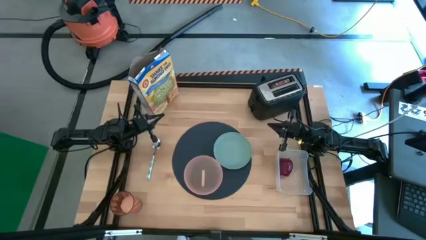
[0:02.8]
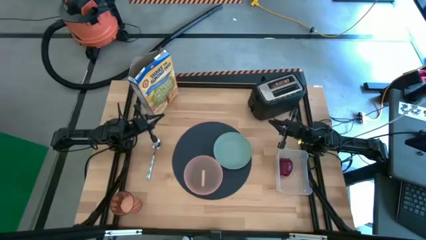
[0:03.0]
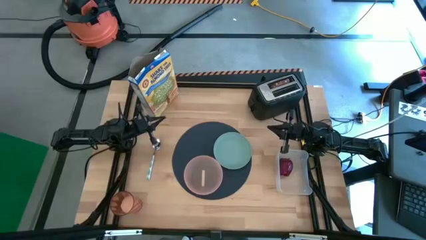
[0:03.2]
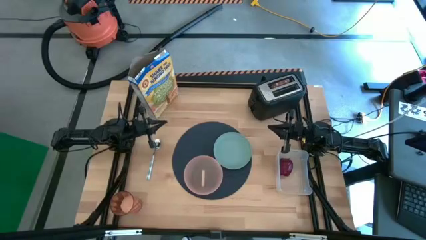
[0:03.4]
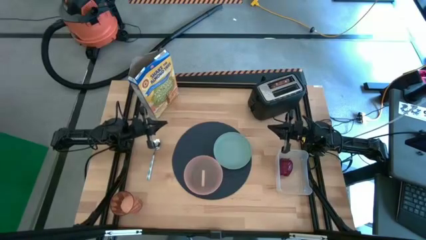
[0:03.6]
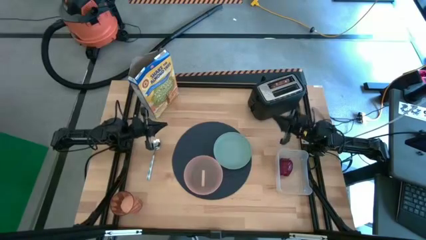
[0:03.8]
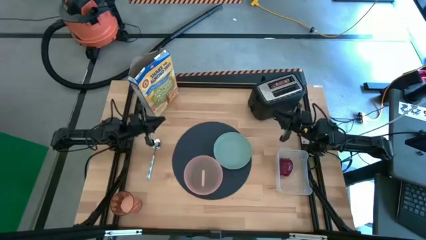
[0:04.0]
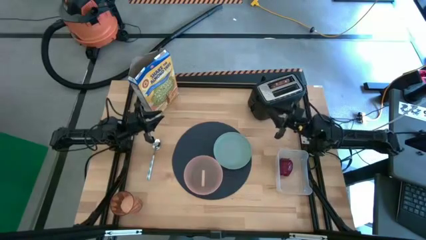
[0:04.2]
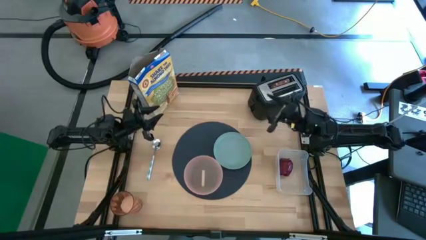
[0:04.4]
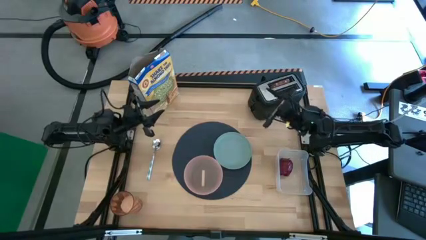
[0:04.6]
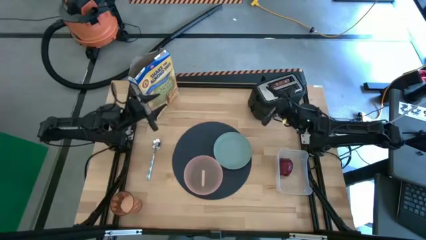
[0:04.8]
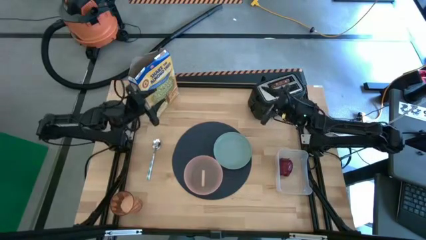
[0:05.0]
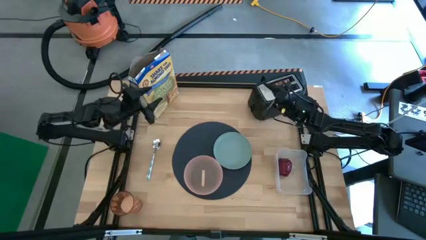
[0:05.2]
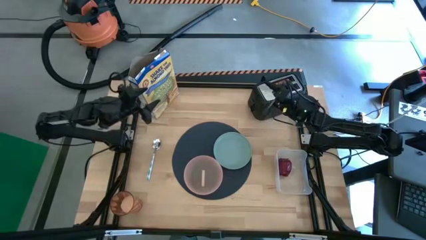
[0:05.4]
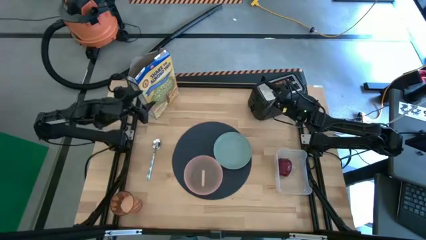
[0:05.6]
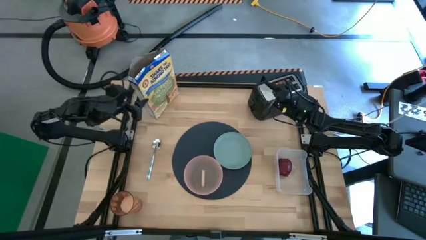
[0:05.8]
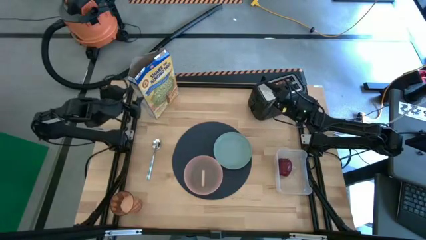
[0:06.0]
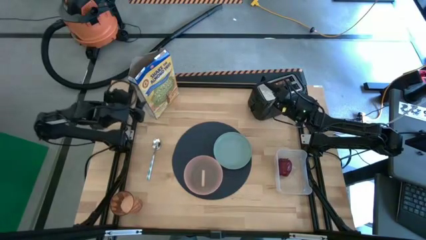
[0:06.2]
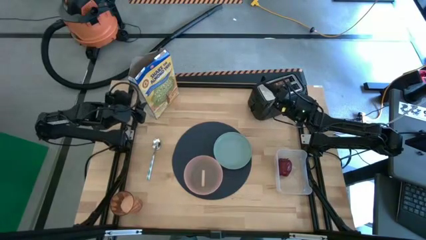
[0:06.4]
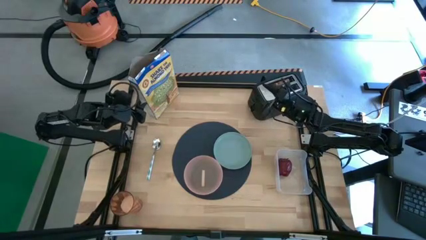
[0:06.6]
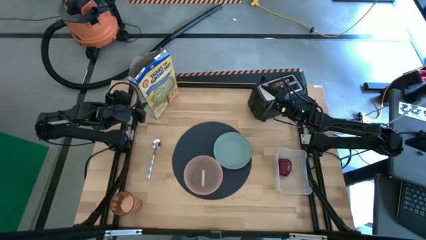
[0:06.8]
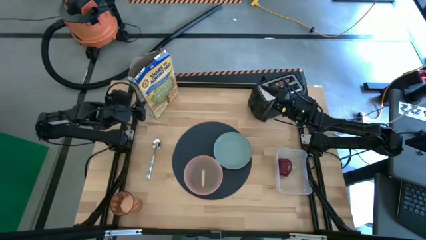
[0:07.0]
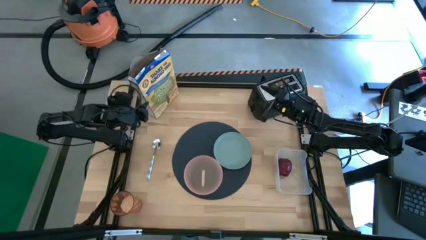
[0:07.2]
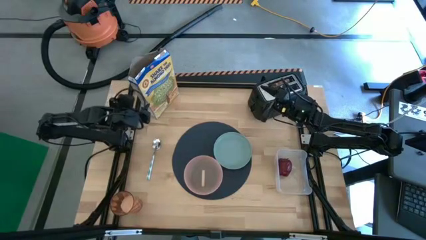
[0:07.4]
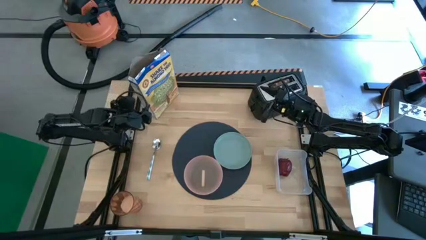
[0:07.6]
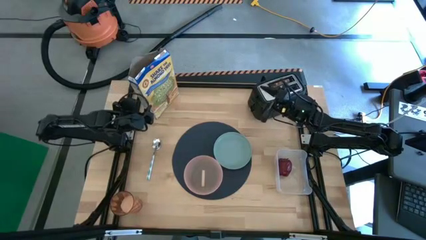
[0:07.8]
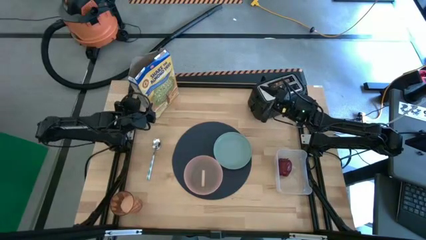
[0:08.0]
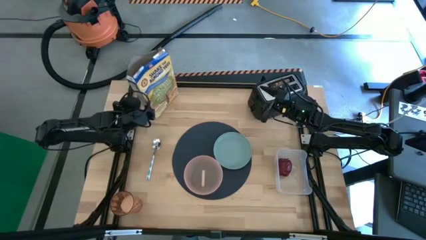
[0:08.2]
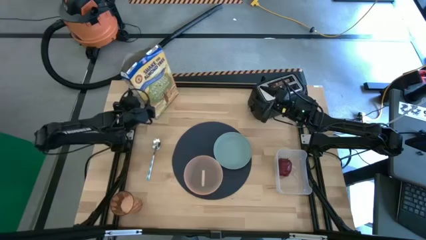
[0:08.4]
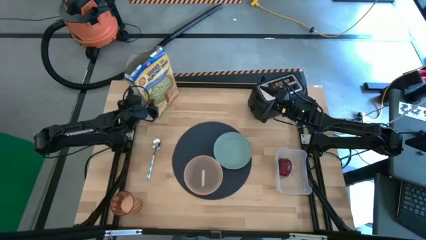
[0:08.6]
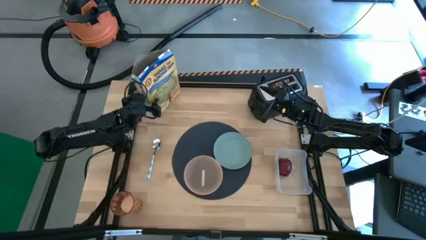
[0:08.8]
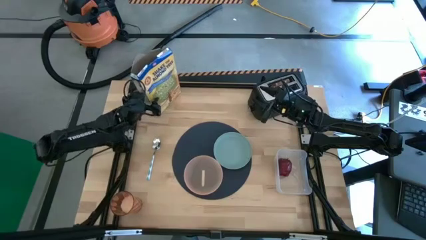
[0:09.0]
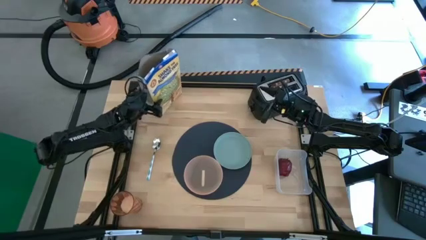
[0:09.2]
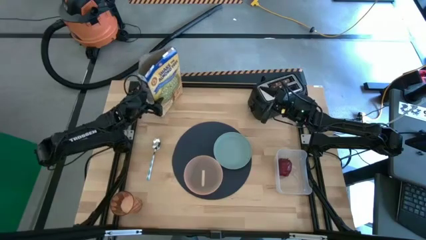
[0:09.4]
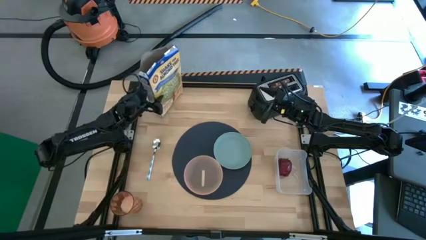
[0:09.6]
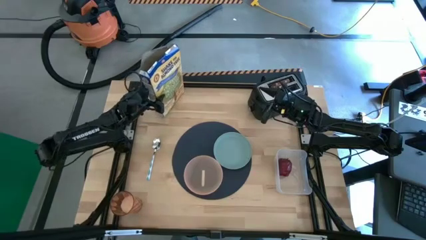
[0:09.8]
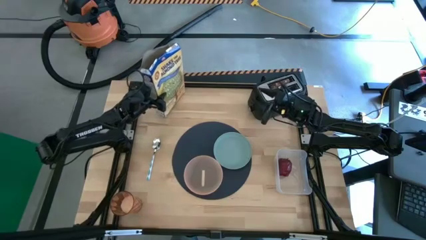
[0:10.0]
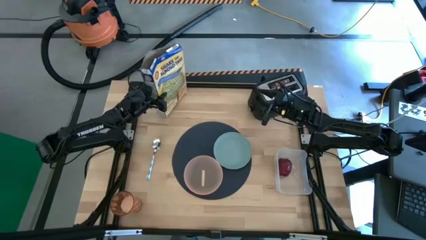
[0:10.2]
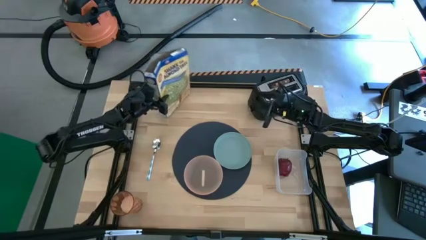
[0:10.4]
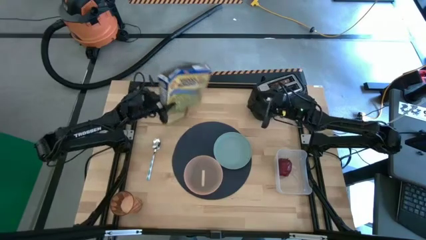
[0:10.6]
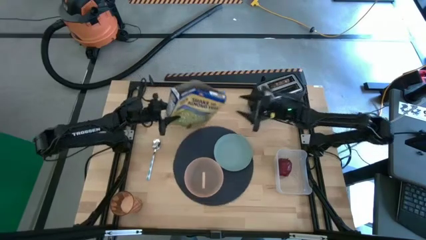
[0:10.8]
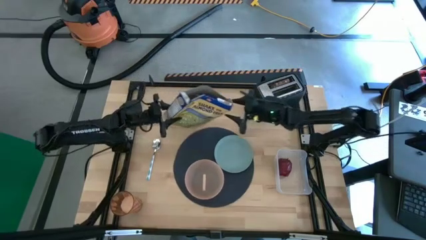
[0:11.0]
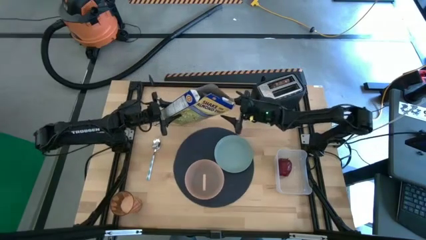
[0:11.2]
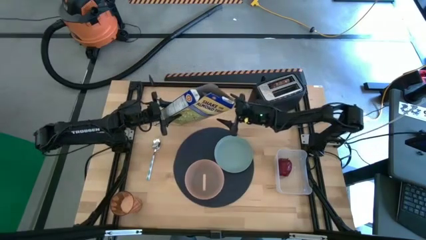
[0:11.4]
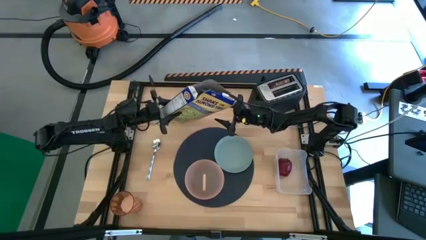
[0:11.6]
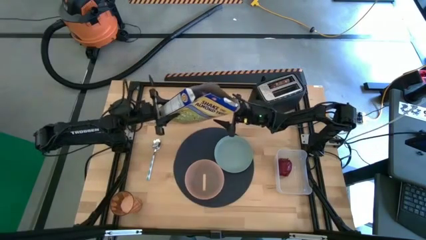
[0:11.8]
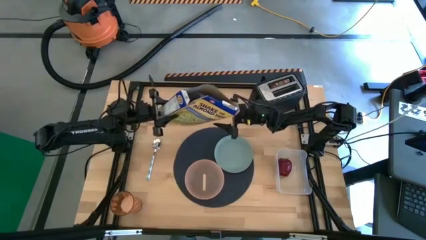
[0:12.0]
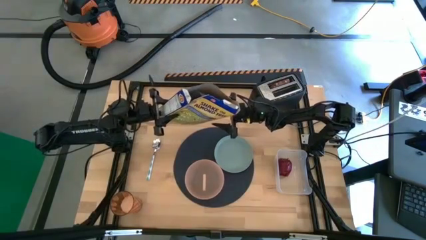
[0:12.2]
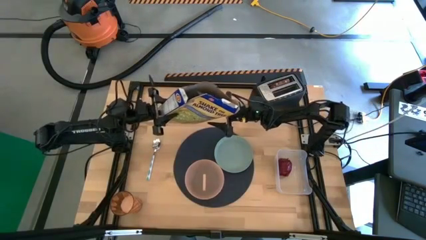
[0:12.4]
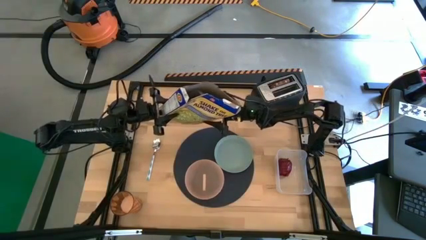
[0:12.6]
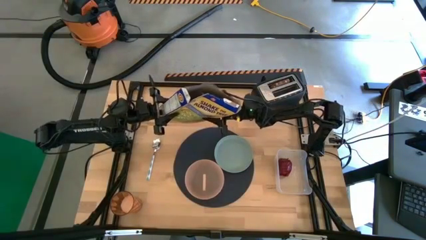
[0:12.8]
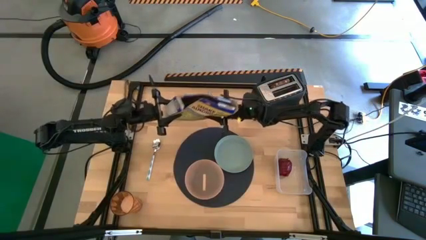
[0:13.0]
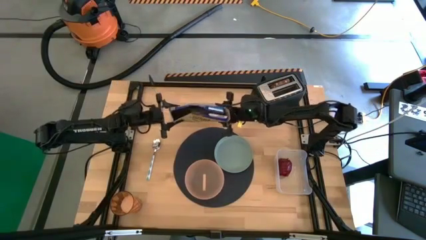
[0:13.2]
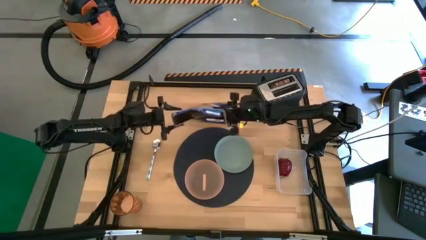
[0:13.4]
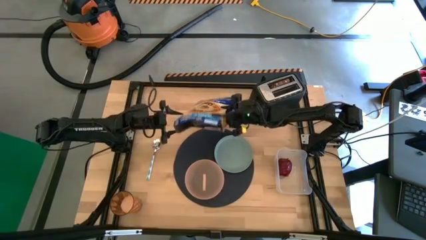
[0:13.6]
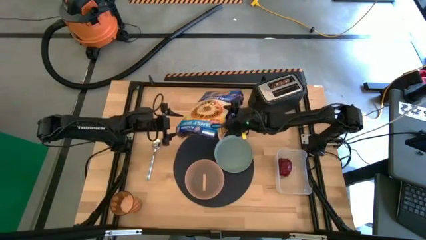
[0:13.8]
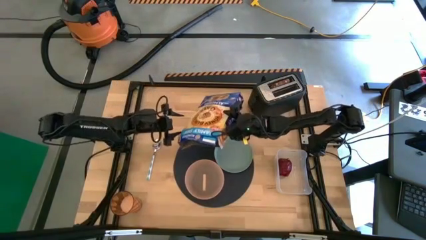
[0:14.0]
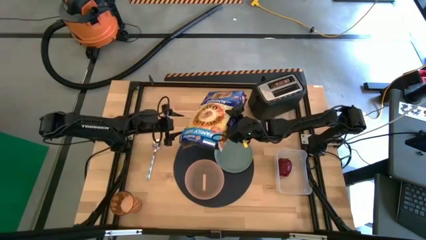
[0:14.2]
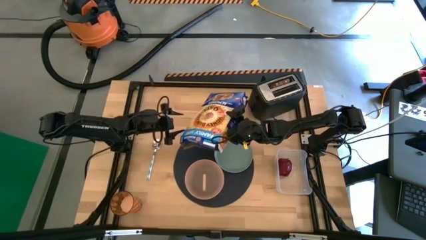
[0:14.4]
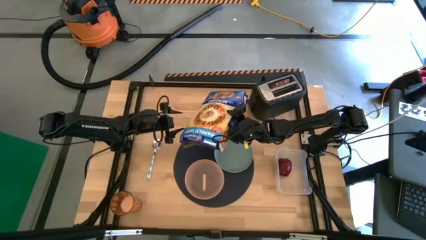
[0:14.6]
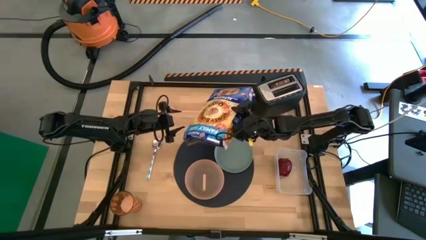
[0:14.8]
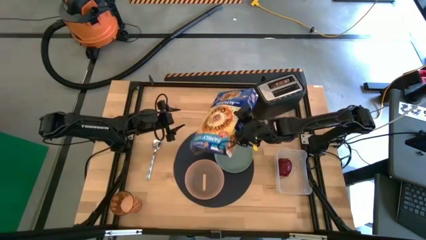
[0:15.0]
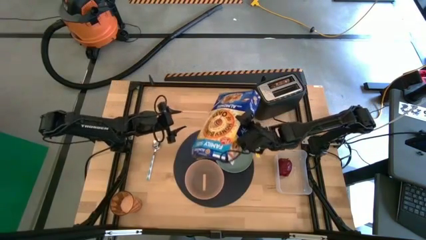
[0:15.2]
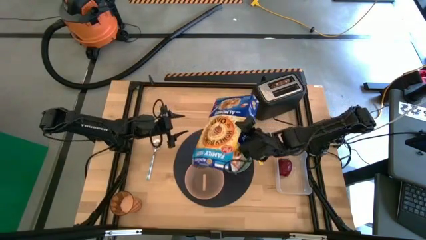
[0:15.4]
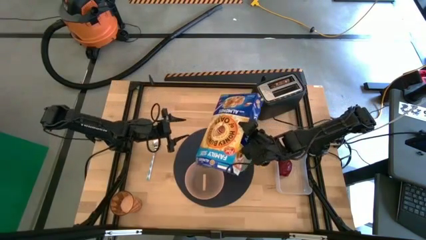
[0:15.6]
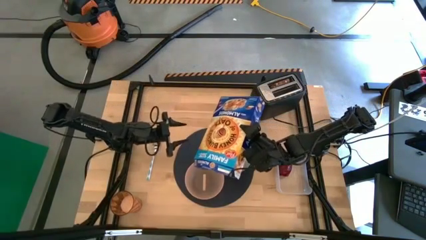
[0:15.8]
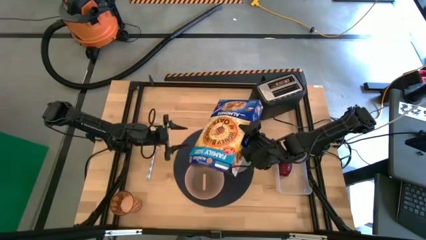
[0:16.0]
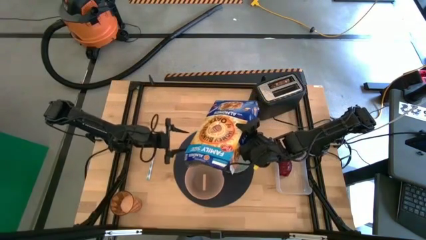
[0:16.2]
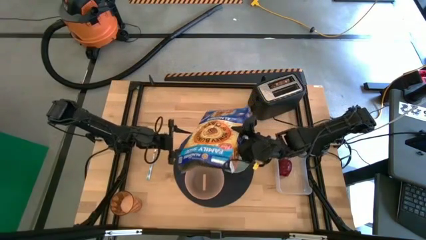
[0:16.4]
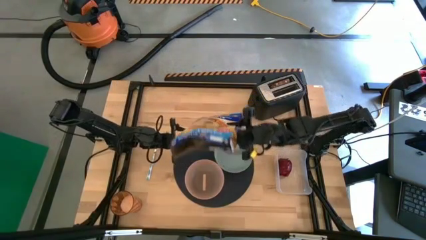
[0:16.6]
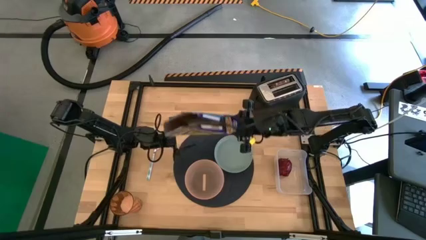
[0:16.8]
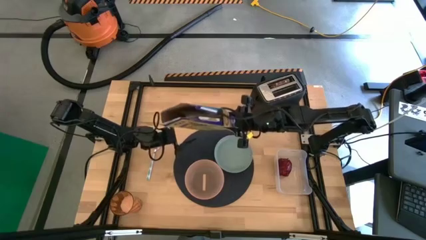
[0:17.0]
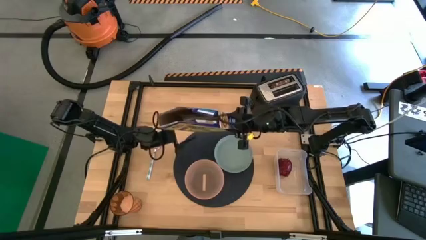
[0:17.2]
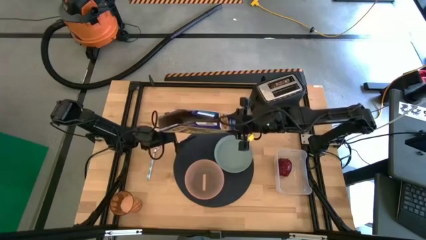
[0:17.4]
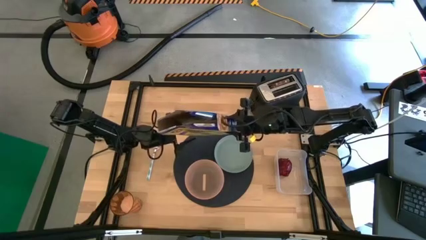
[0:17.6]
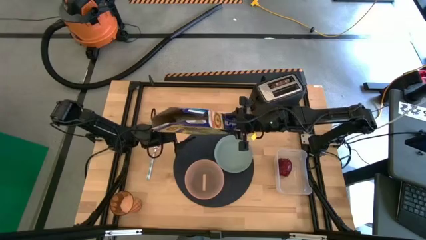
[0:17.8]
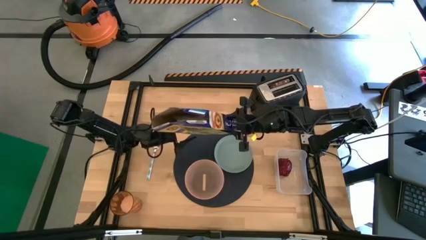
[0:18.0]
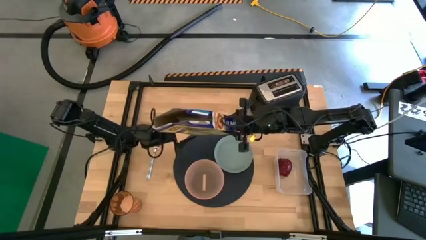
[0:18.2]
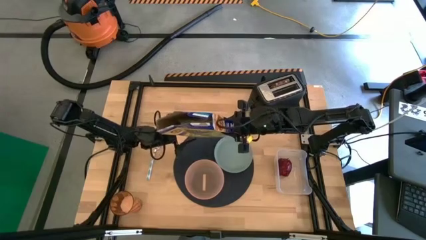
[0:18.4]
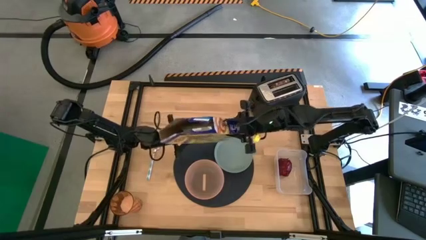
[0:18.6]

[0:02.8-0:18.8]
Task: Arrange a breakfast setting
Pour the cereal from the yellow cereal box into the pink bowl
